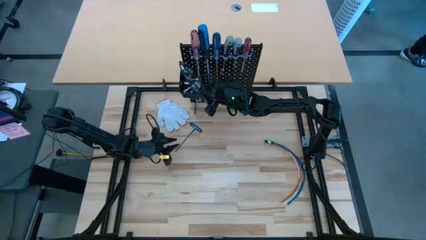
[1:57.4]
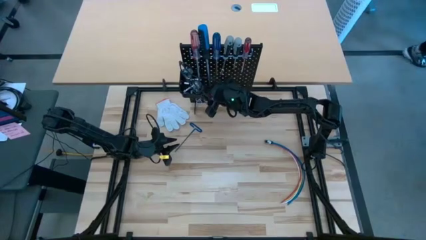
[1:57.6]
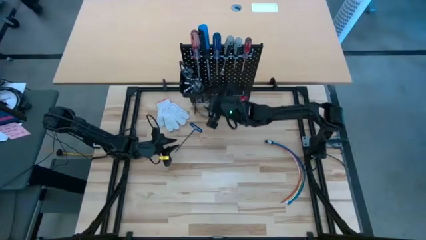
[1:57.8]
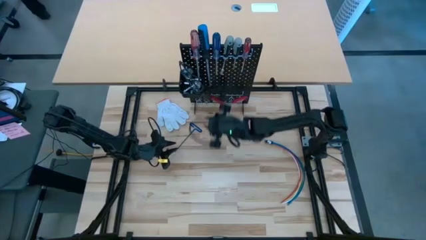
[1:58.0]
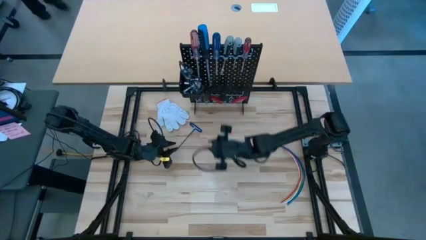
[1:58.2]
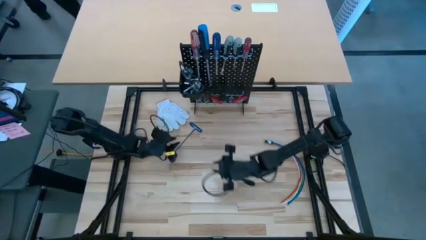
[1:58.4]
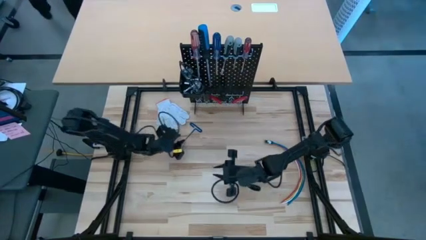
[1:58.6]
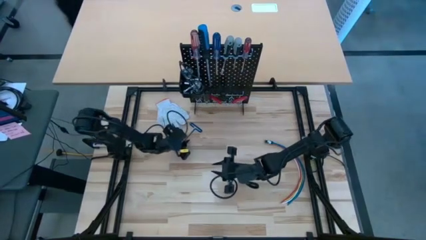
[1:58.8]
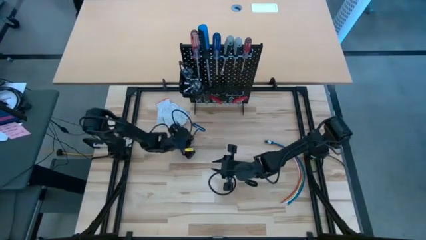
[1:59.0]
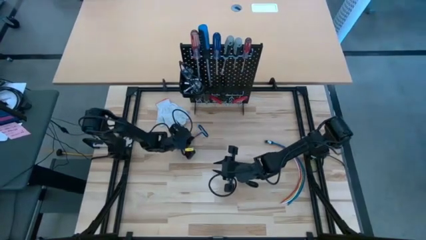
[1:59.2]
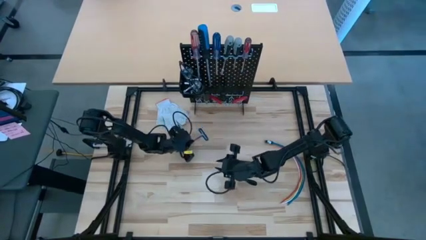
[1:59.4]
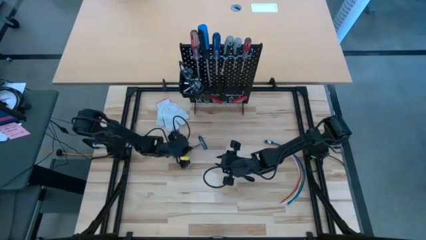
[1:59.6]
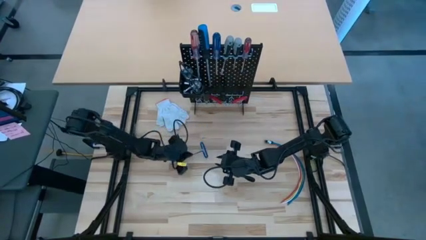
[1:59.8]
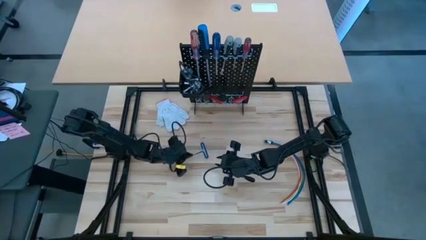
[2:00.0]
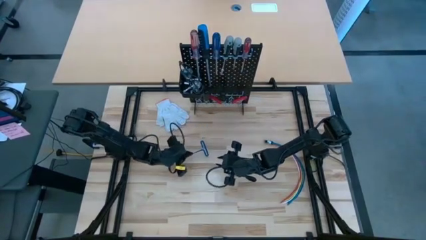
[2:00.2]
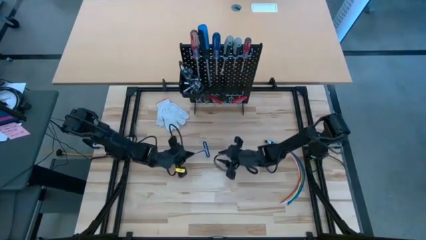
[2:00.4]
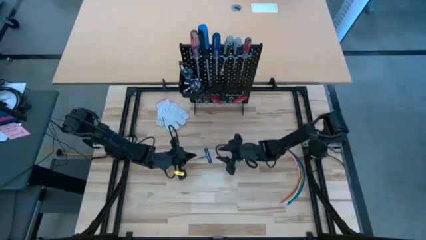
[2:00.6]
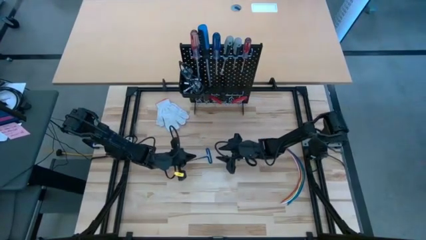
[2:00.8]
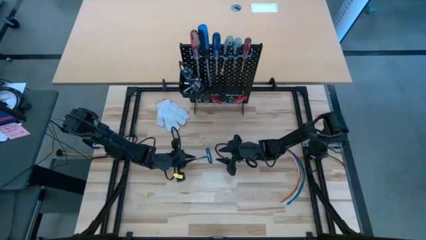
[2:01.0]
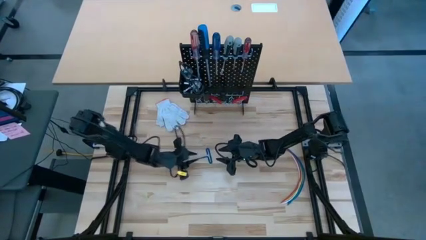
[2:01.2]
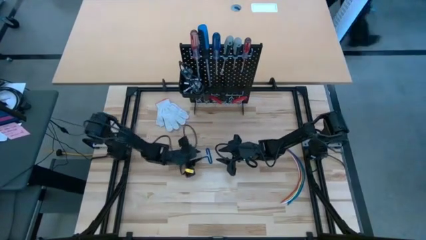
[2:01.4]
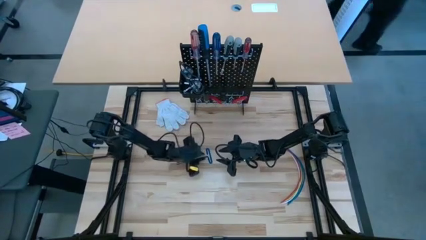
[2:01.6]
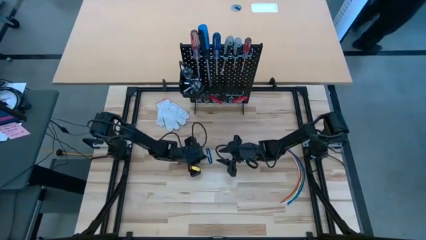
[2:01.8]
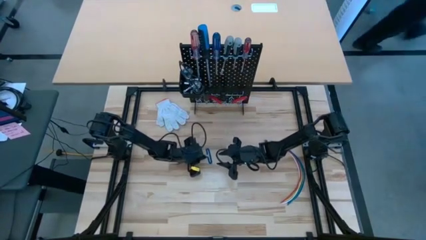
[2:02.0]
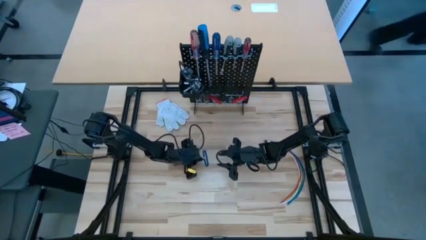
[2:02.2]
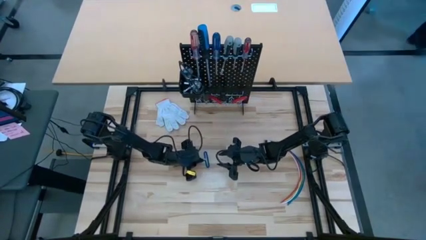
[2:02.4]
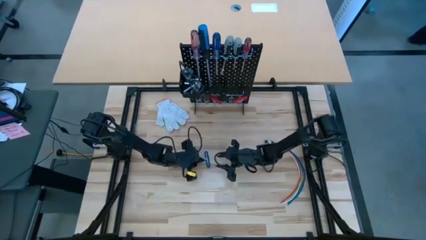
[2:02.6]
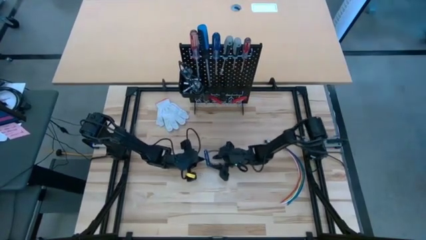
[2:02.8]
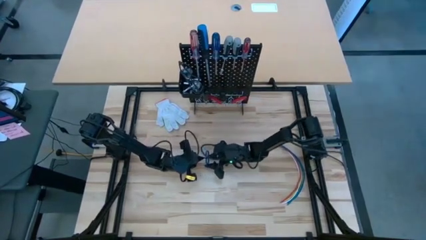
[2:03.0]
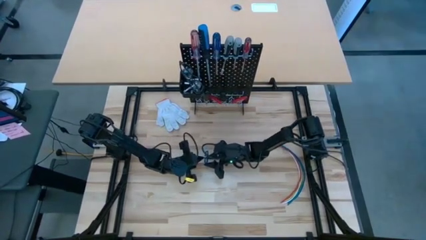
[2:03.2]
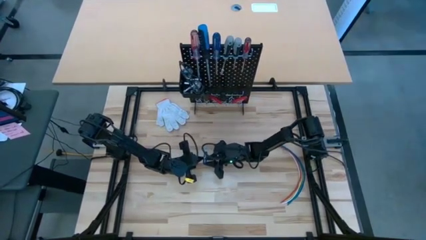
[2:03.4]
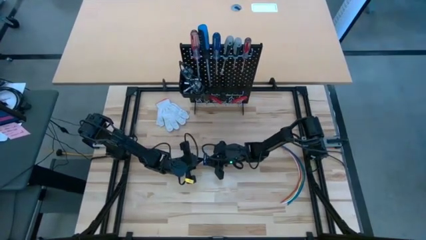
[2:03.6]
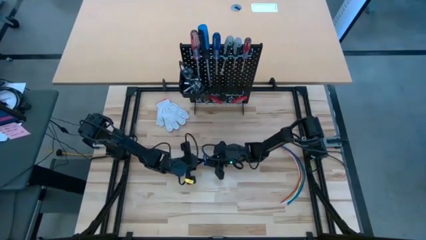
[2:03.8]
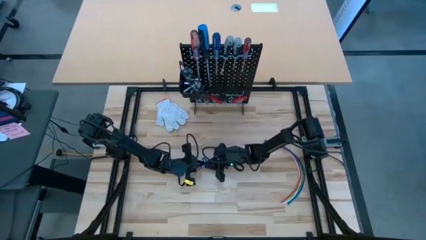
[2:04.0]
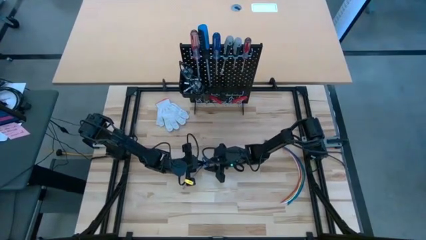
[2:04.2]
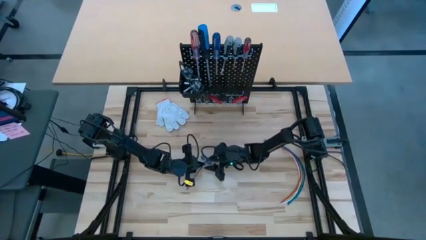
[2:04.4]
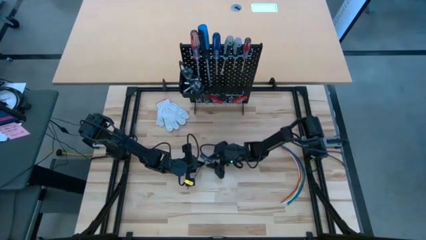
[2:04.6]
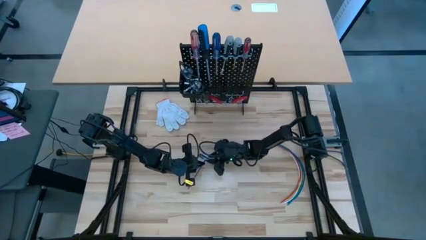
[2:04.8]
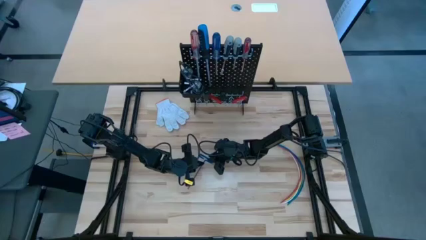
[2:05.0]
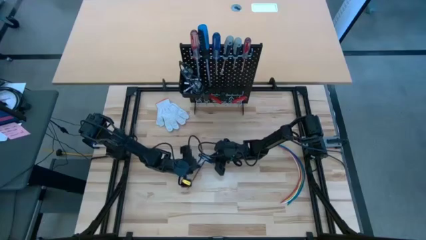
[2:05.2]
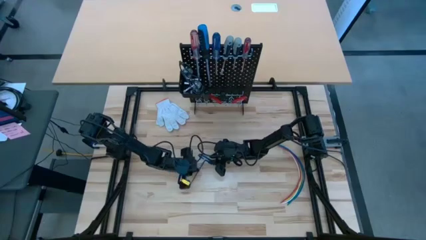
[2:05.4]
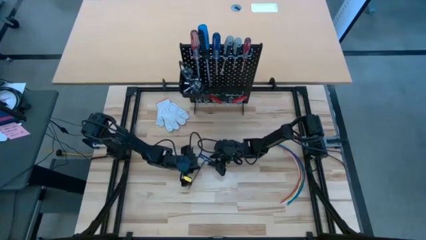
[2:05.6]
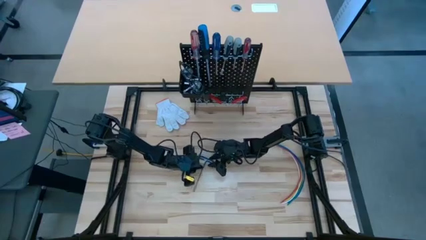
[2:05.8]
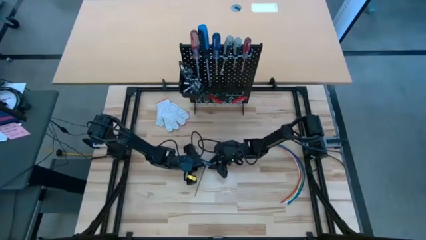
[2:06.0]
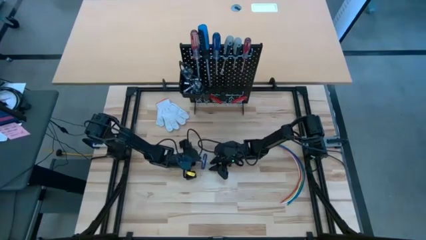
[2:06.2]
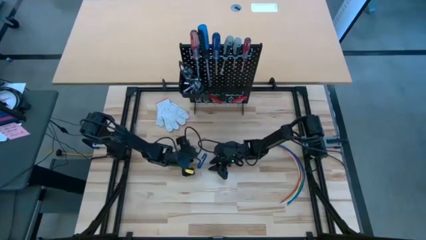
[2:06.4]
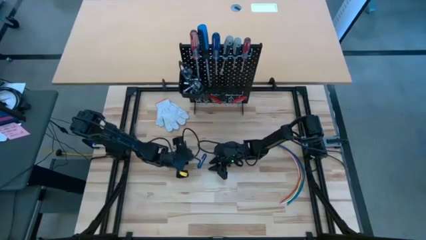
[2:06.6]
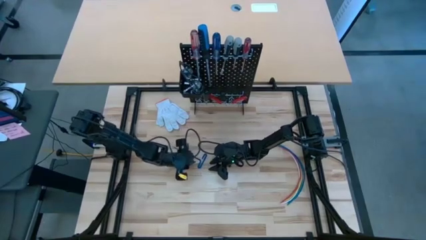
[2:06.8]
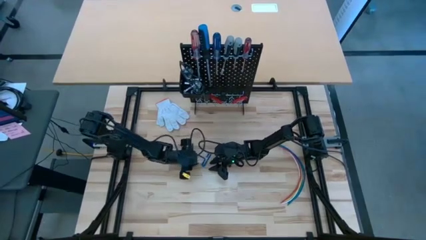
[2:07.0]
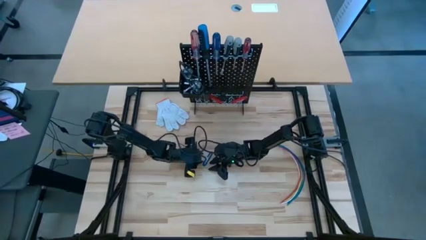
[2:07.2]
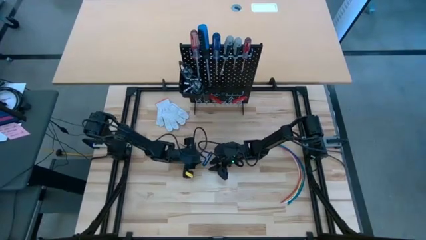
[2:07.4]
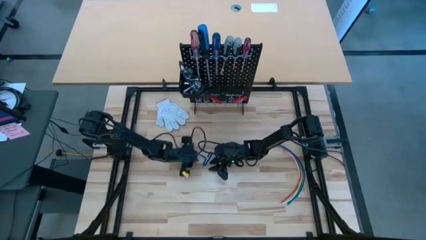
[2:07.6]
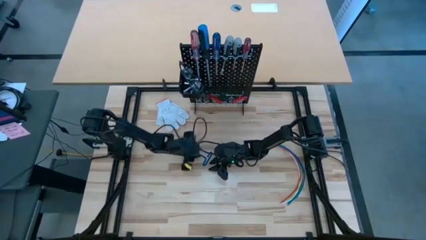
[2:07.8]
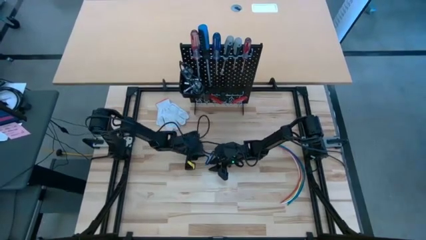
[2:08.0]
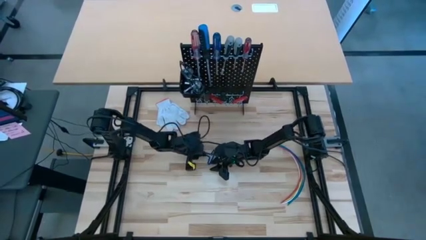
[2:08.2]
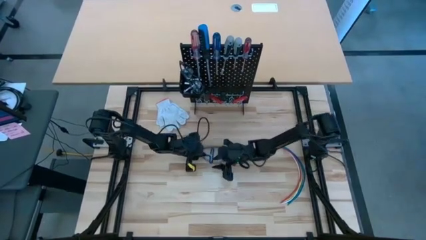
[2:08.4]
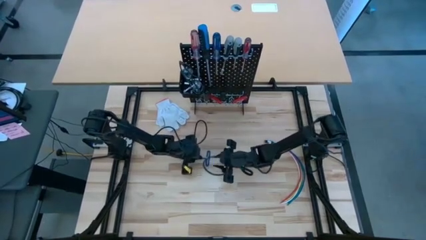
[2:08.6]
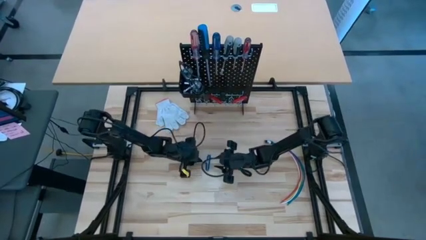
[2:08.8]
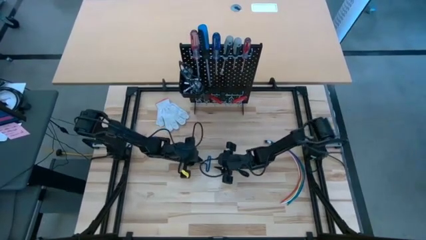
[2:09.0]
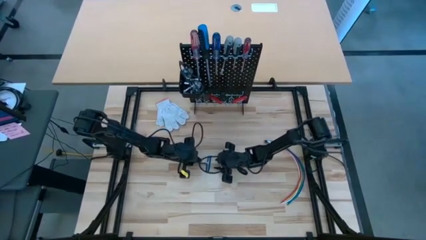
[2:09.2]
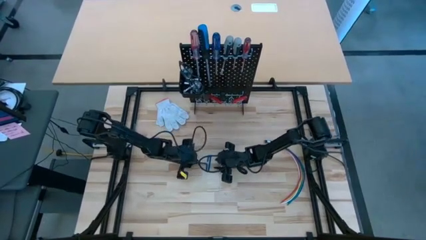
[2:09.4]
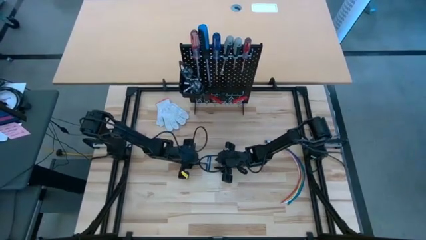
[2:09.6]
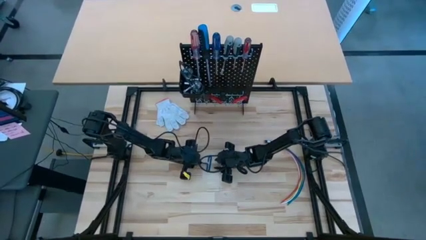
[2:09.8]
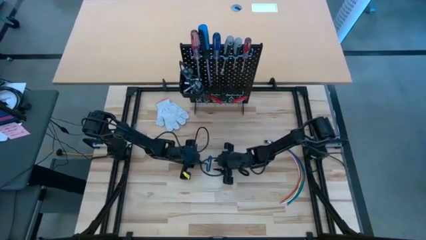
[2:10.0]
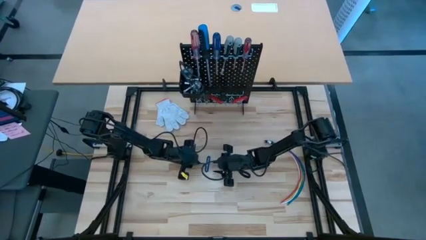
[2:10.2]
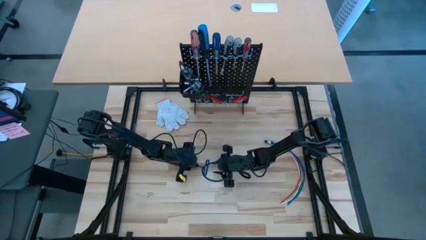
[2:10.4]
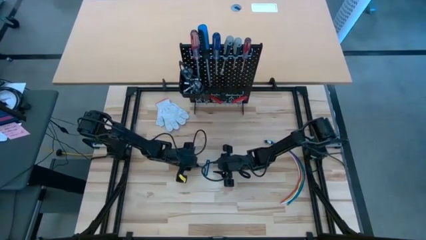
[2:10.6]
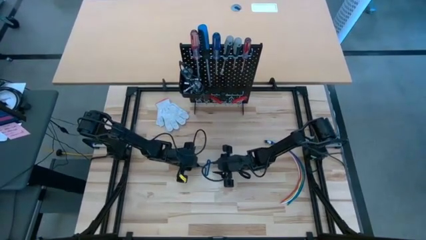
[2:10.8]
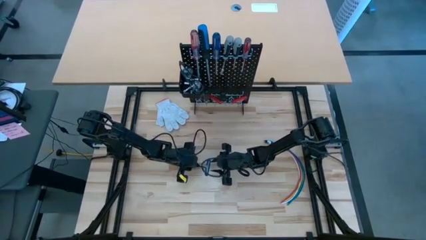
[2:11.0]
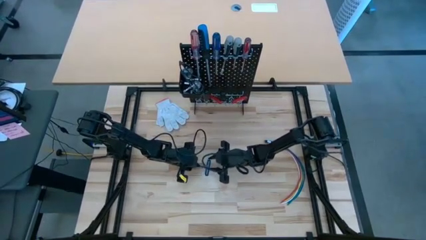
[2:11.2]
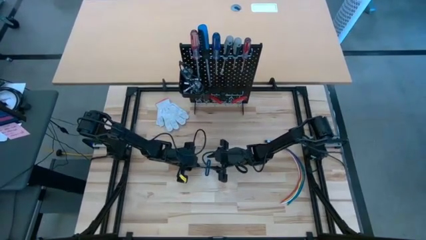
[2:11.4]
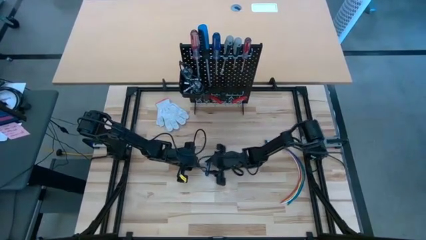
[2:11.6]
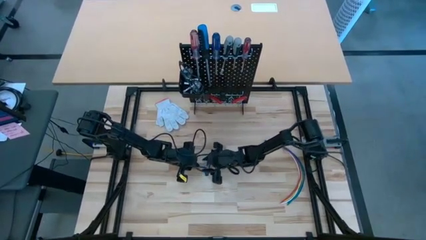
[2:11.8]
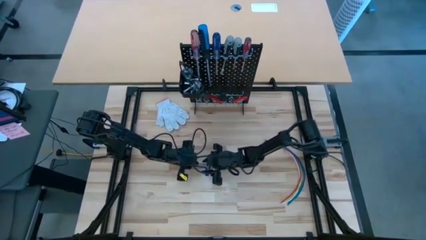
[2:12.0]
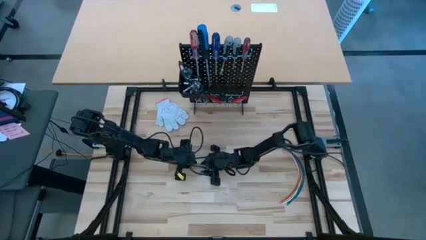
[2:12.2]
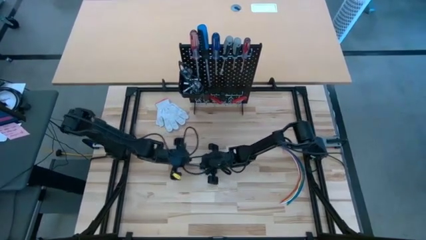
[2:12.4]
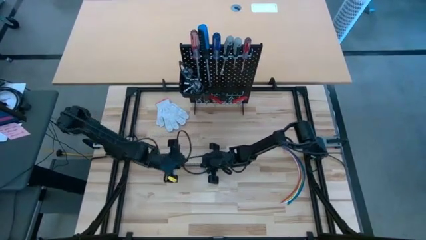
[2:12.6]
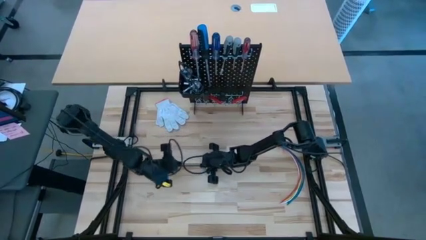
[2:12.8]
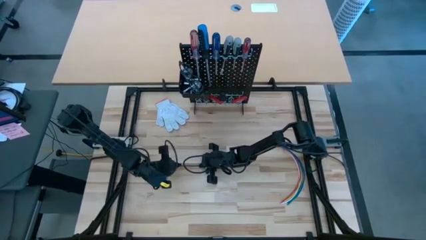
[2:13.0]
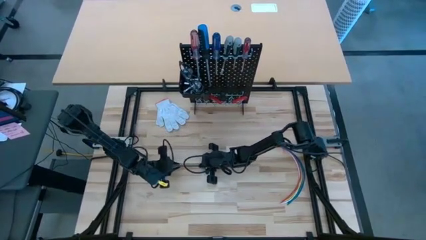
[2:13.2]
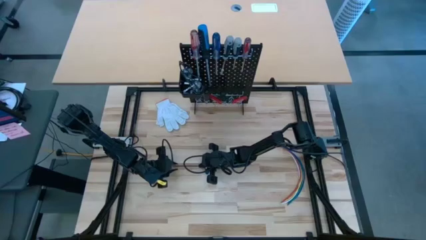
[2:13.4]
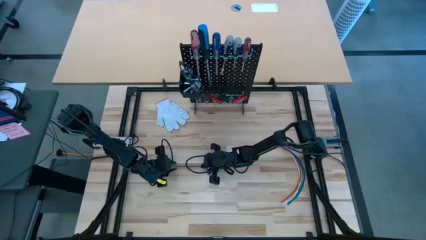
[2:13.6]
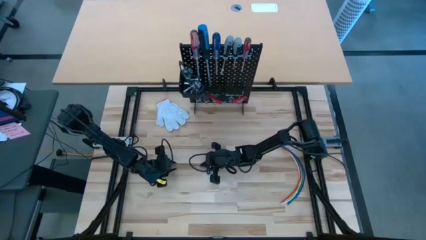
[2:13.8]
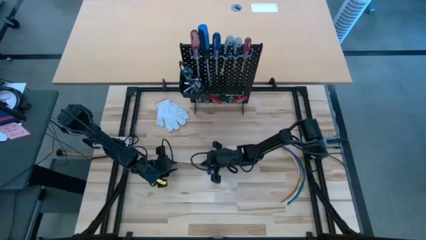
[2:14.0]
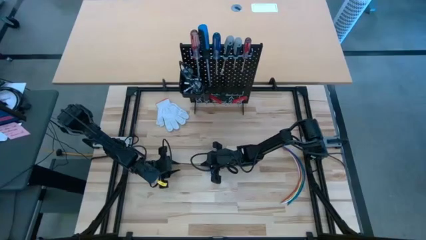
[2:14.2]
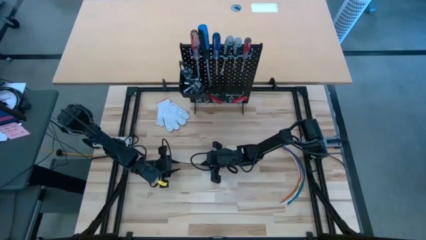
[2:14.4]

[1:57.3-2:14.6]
Task: Hang tools onto peg board
Hang the blue pick tool on the peg board
